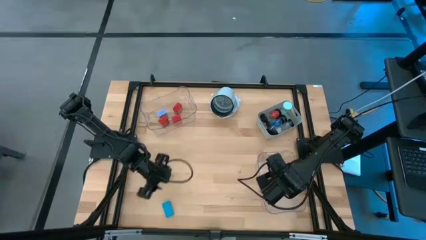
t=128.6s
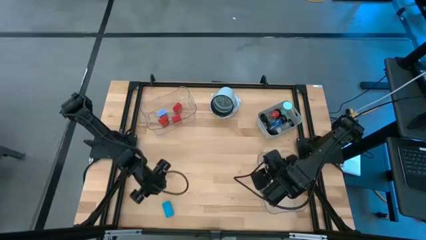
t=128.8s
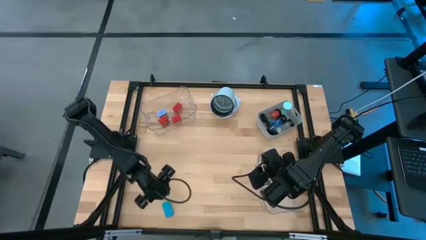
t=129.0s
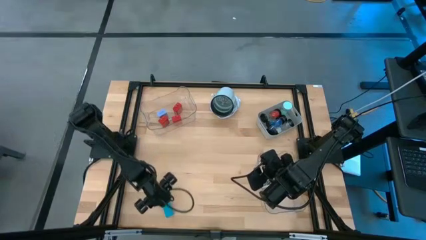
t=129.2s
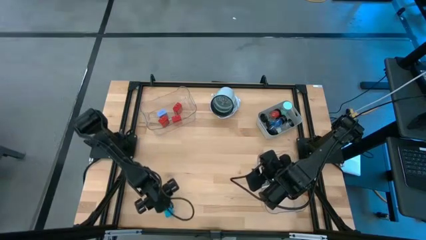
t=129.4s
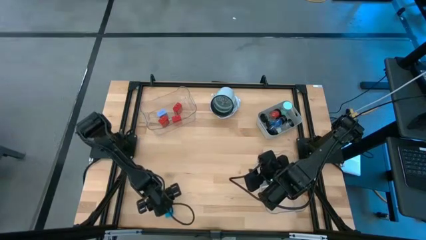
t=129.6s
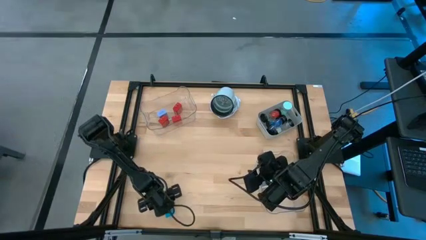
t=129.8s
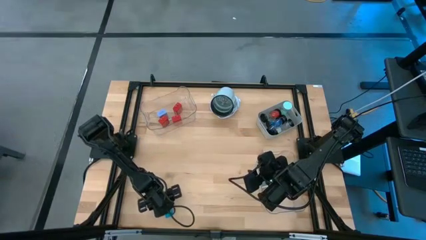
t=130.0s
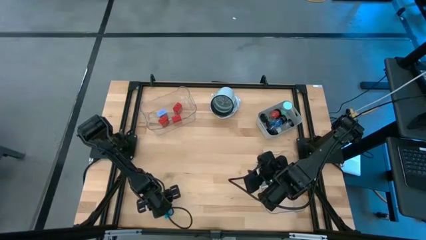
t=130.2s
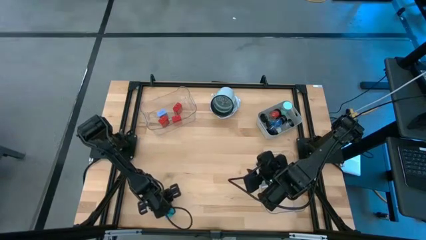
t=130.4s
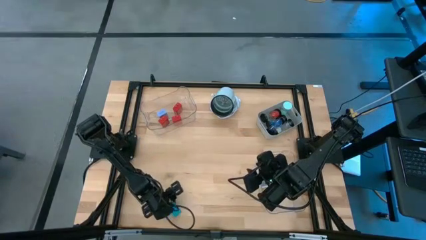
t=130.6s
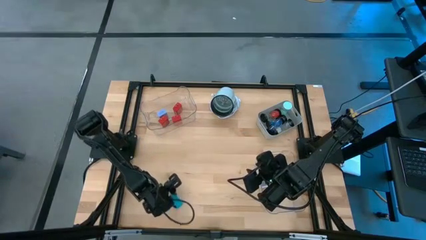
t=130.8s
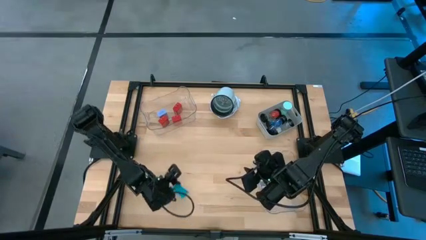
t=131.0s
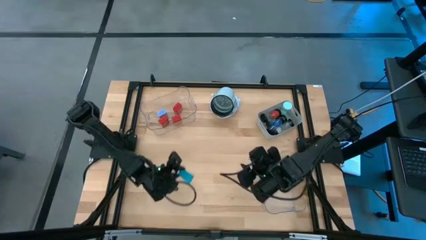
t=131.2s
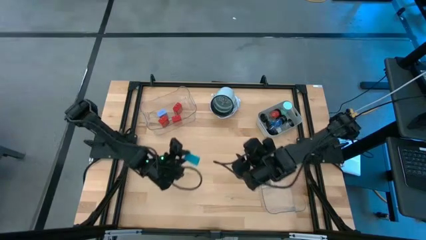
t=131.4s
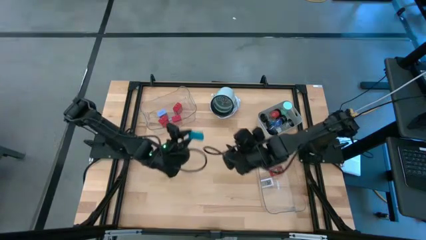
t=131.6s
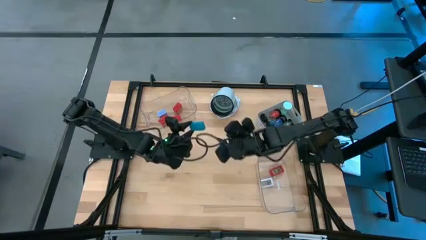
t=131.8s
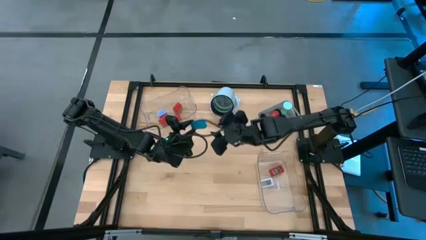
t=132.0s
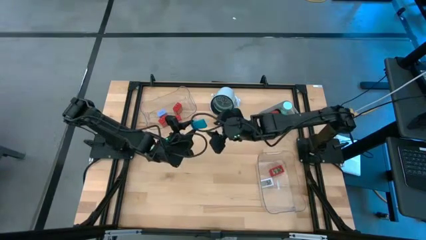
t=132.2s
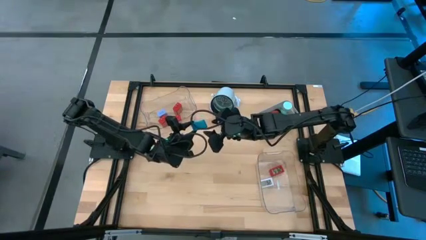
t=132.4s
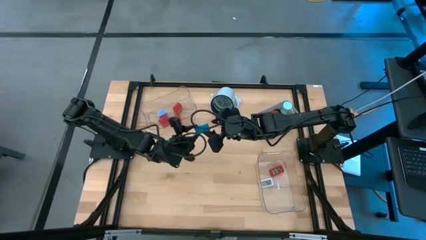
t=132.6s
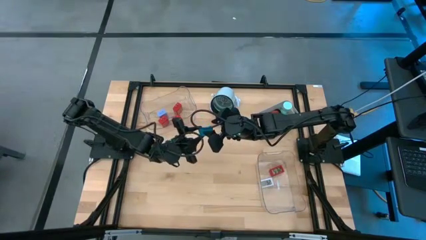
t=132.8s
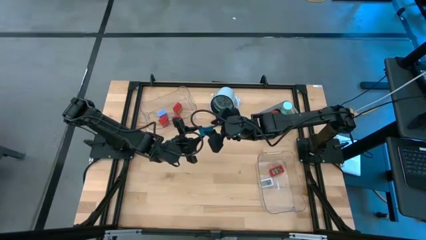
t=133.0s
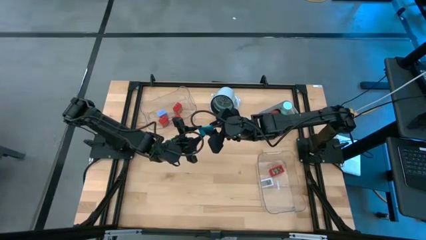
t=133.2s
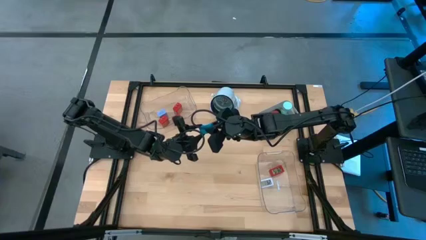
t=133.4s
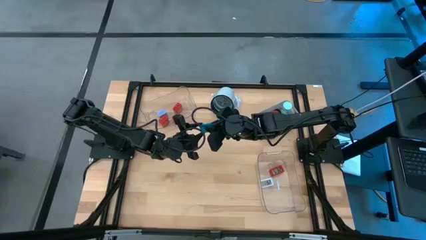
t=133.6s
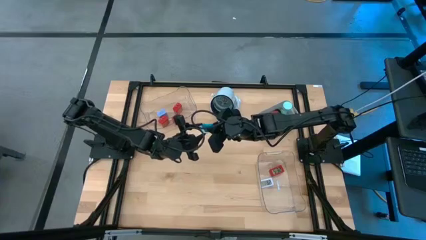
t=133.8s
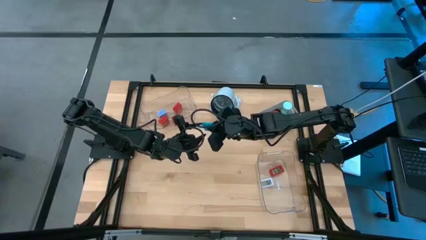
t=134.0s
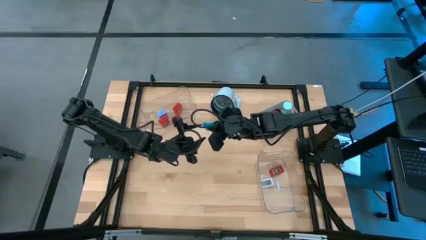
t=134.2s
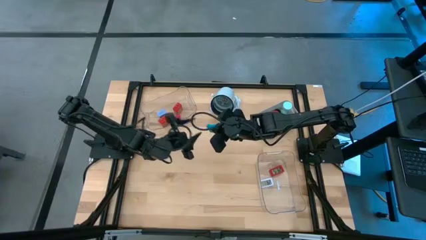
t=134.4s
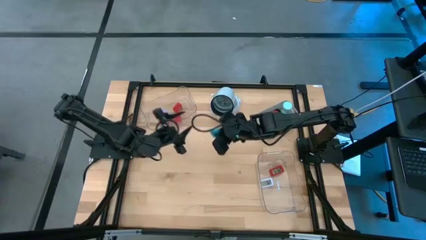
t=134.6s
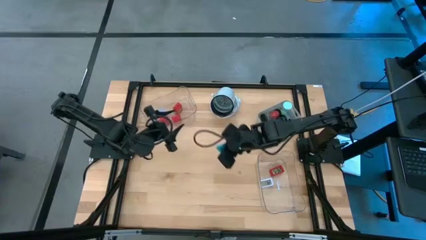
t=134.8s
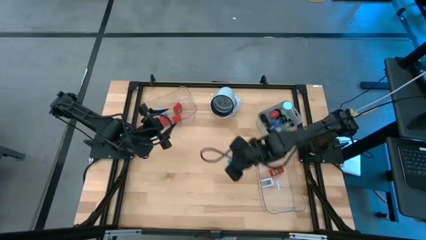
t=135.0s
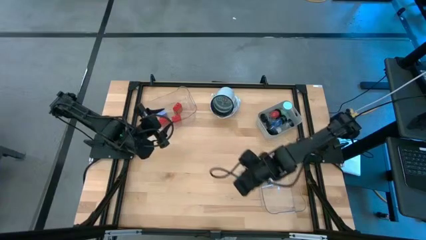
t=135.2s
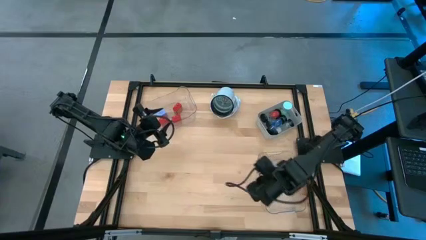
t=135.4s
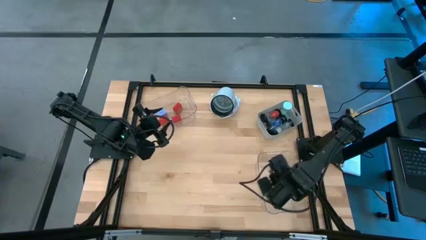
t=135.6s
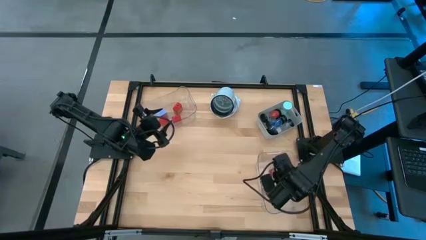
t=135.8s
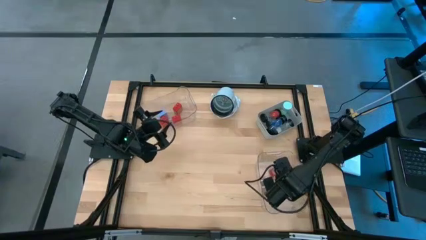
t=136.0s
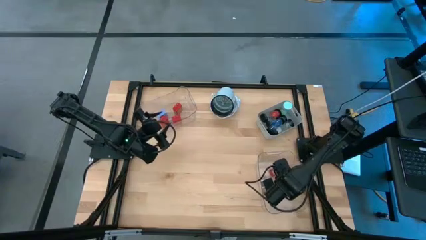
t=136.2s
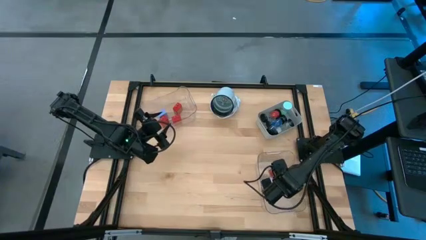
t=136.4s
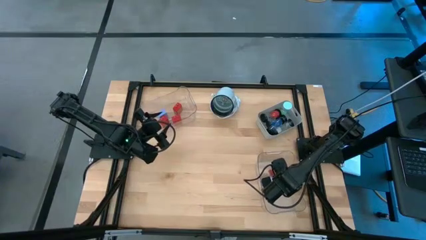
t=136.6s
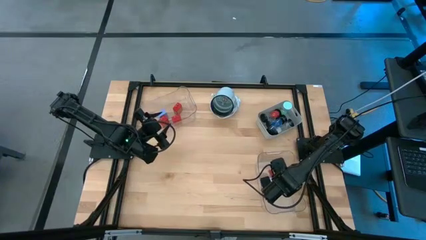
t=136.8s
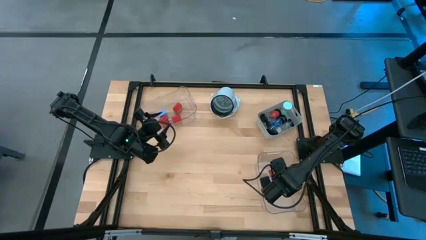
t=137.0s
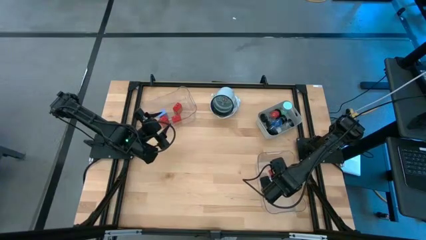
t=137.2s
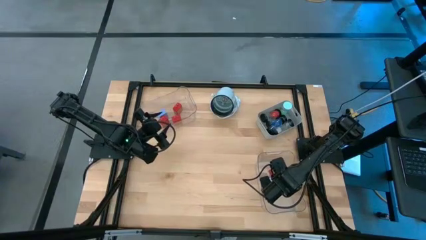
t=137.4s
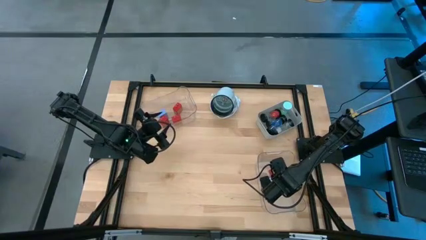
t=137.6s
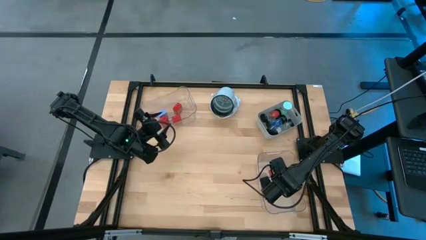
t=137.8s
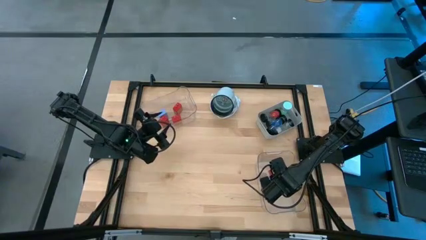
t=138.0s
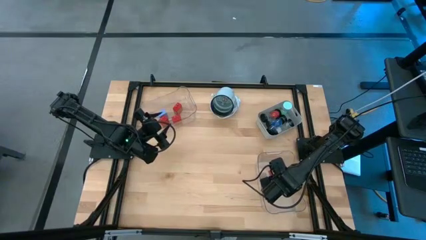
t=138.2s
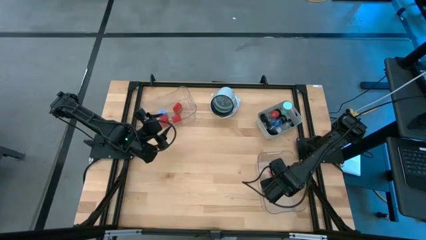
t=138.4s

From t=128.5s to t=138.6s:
Task: Pick & Place Office items
Put the green digital clock into the right transparent bin

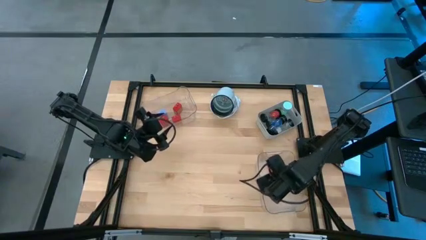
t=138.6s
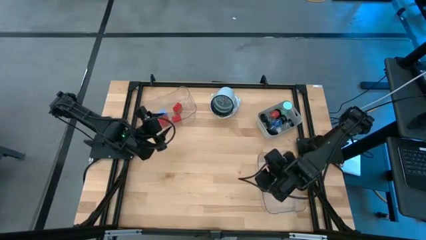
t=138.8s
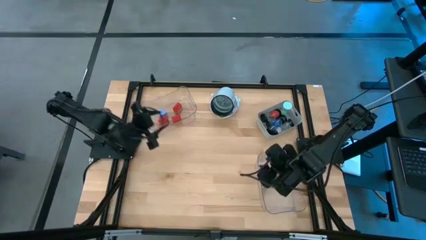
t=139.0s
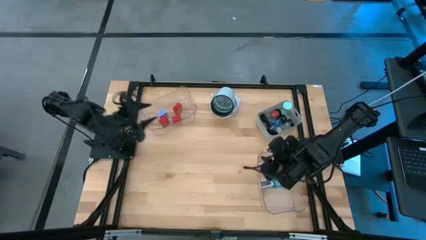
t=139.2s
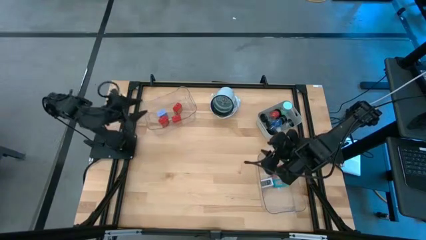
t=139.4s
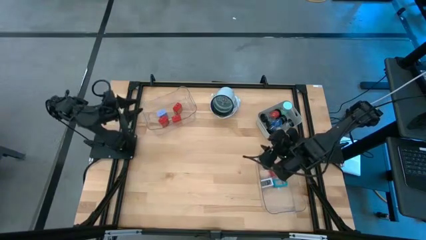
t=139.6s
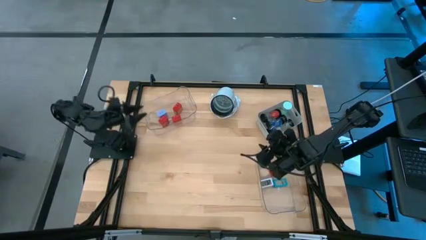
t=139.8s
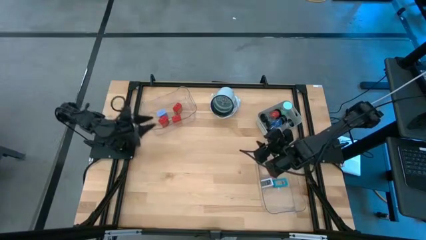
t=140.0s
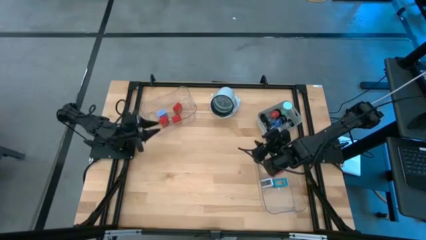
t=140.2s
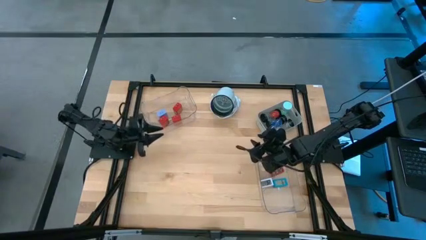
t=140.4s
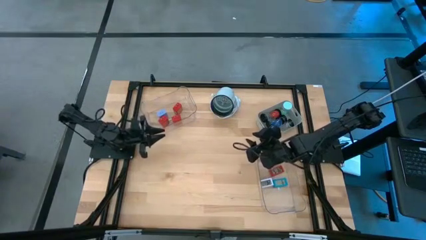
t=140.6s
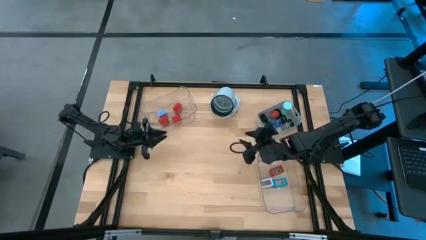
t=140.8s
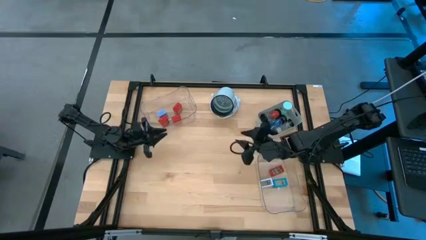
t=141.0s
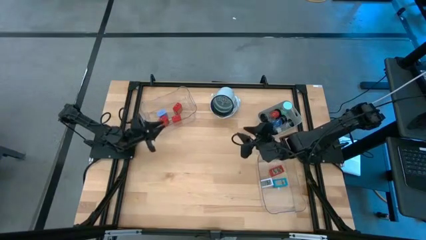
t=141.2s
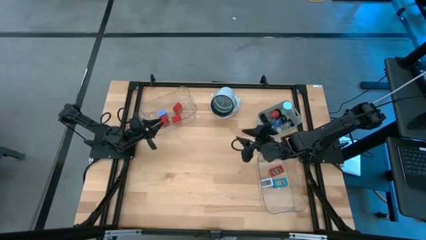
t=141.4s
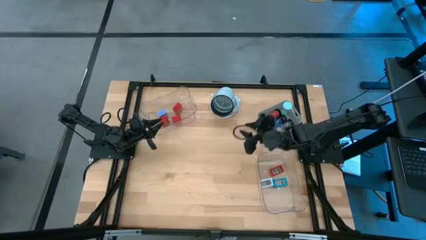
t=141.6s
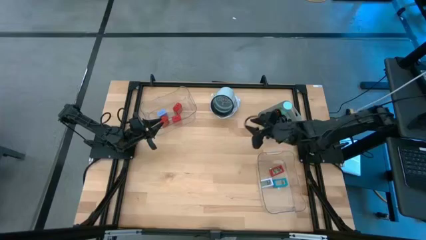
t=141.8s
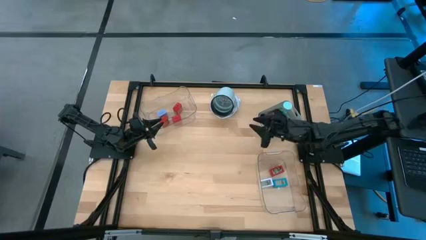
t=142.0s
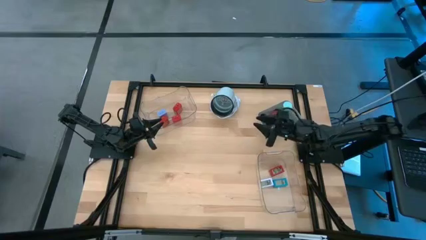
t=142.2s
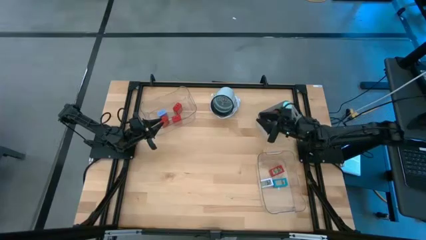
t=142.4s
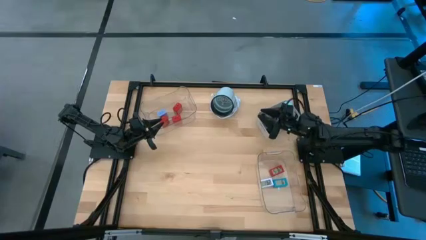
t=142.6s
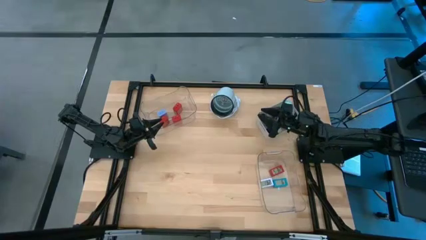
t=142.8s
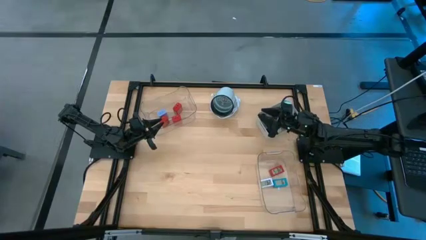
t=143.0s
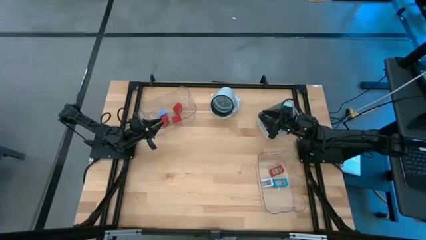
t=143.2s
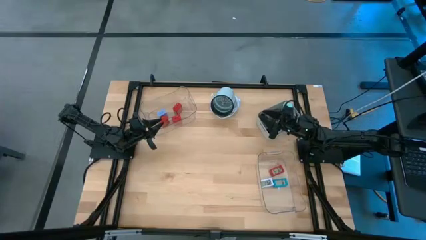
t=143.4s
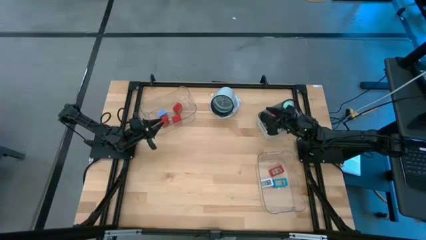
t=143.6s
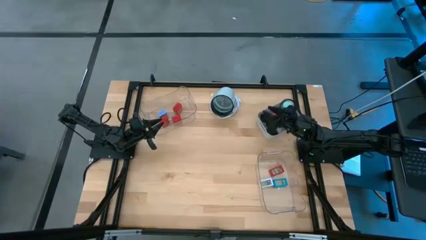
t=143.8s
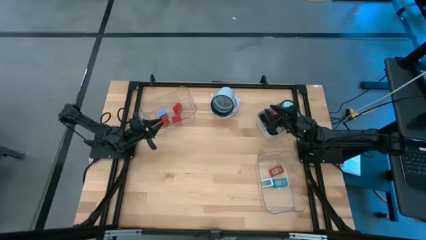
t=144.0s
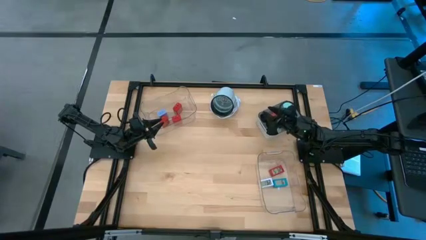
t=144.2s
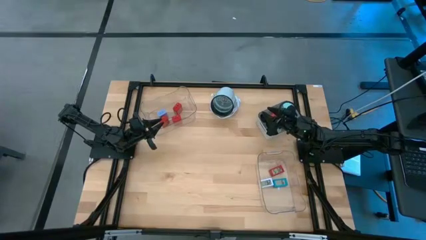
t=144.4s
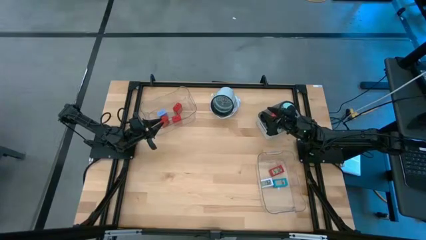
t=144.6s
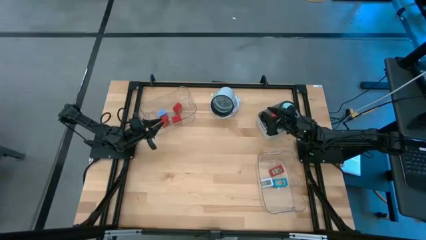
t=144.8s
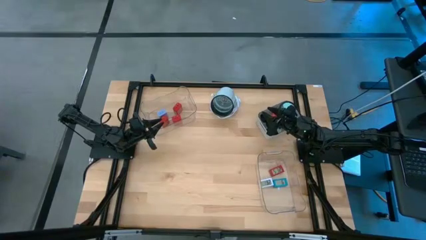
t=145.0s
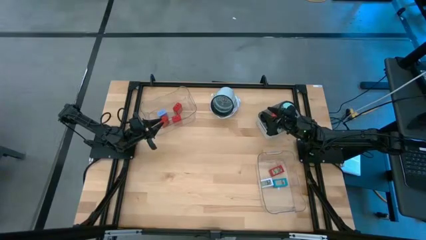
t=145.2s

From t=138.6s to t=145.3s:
Return to Home Position

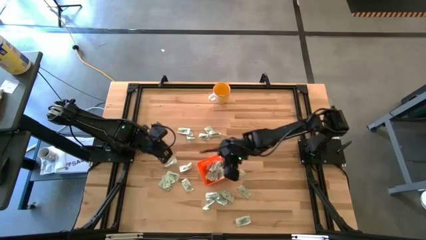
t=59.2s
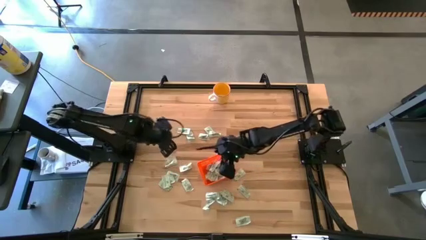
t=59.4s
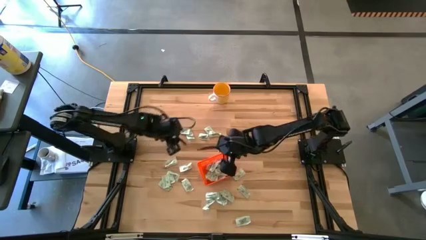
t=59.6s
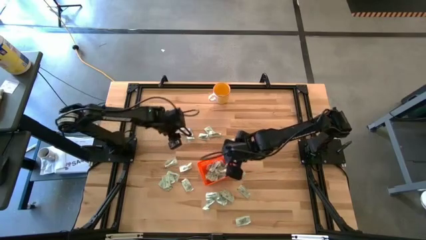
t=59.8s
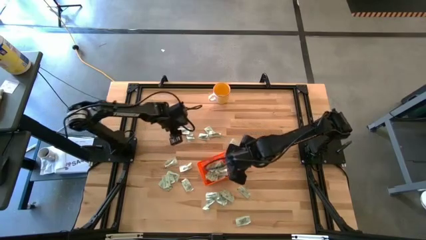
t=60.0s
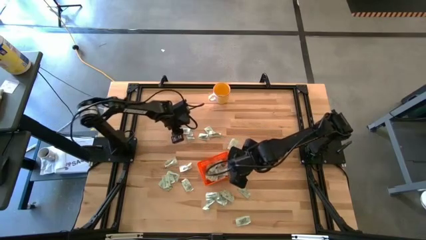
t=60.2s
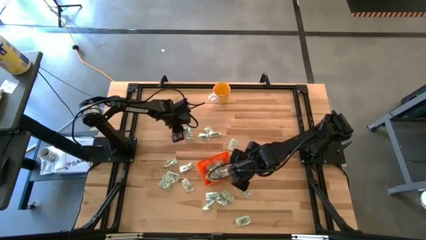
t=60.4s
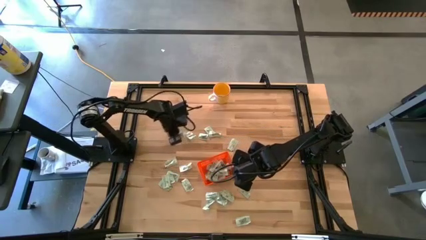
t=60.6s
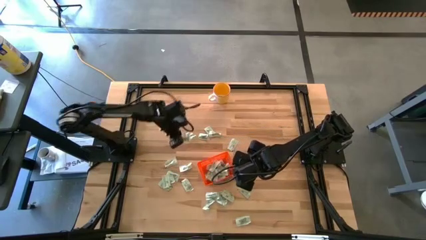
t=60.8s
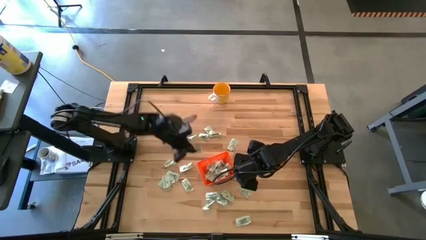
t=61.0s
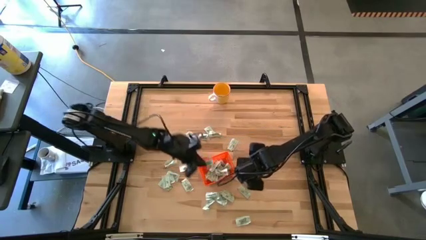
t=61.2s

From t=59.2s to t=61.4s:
Task: Pick and place Stevia / Truvia into bins
Put the stevia packet into the bin
